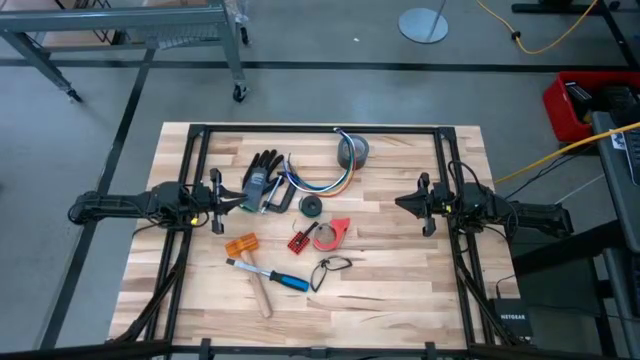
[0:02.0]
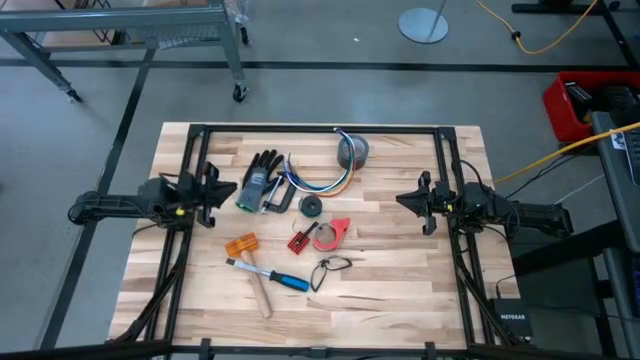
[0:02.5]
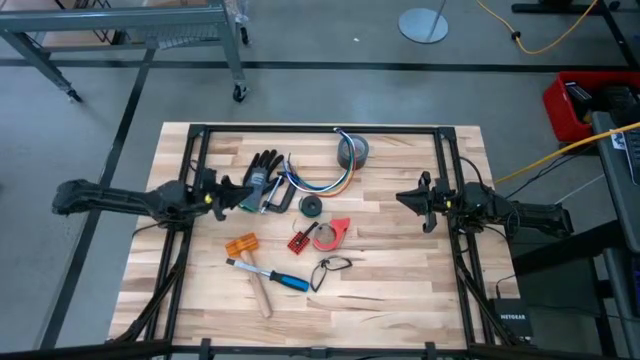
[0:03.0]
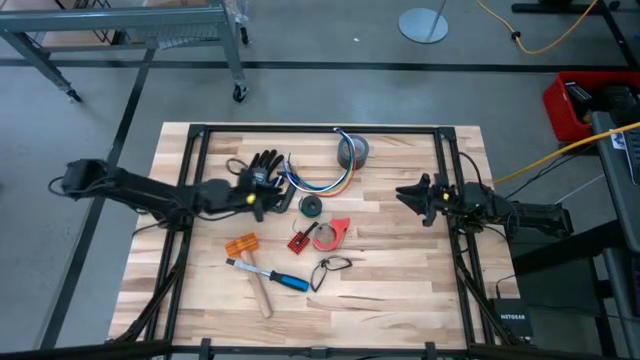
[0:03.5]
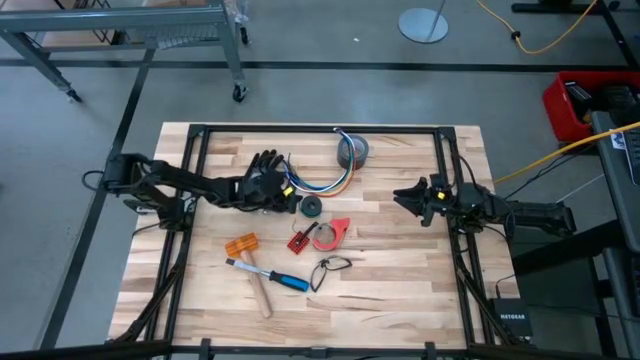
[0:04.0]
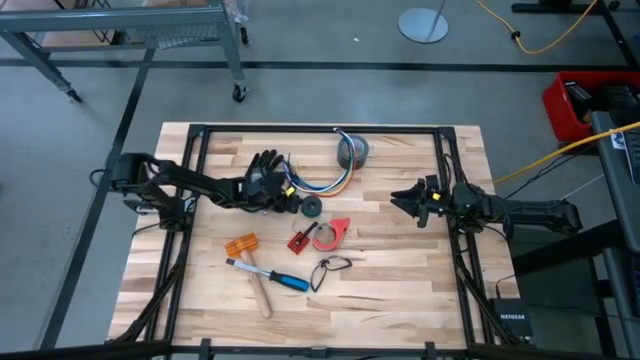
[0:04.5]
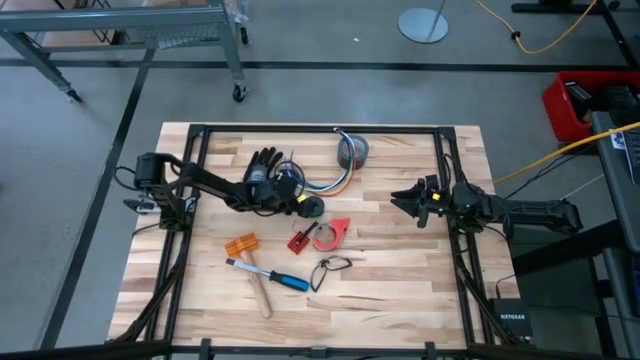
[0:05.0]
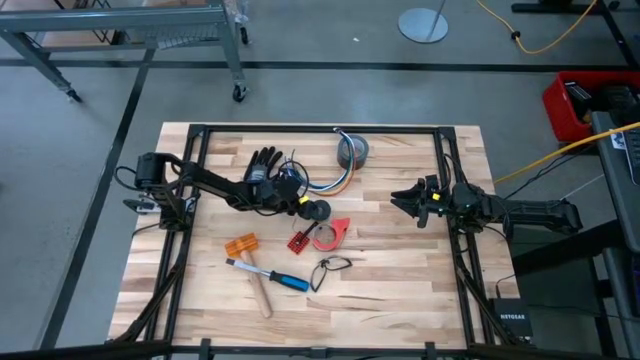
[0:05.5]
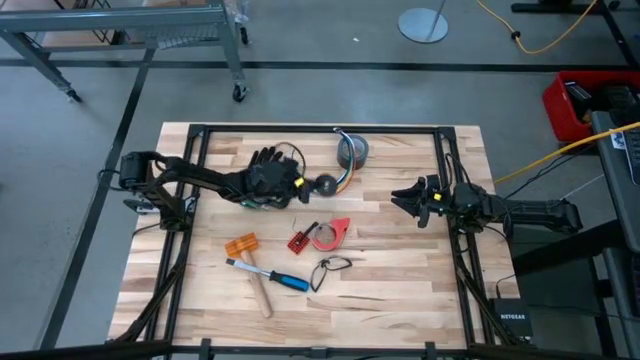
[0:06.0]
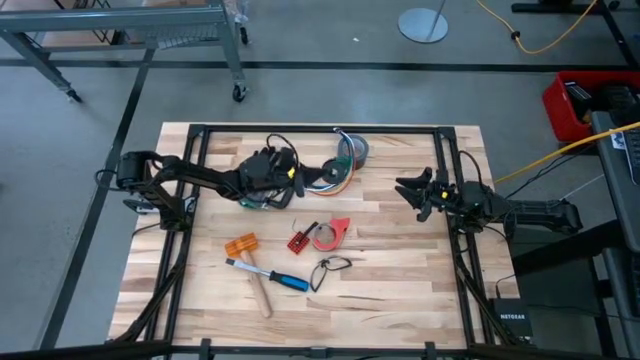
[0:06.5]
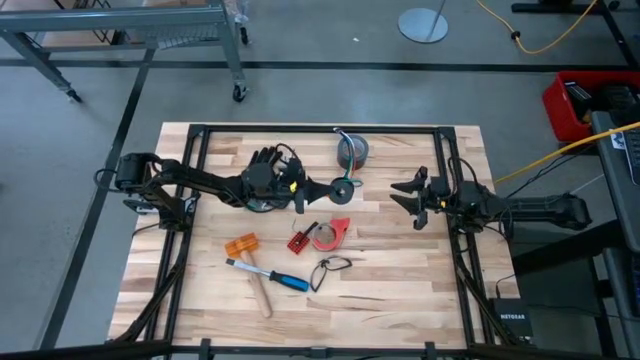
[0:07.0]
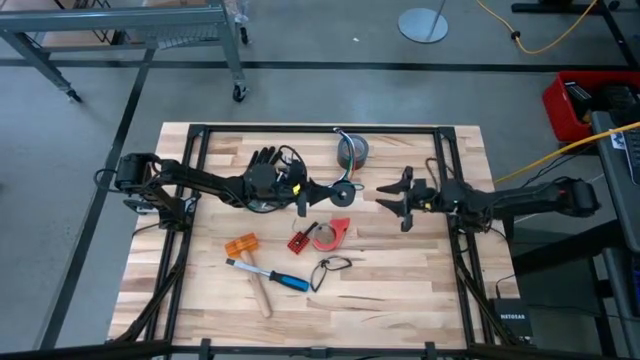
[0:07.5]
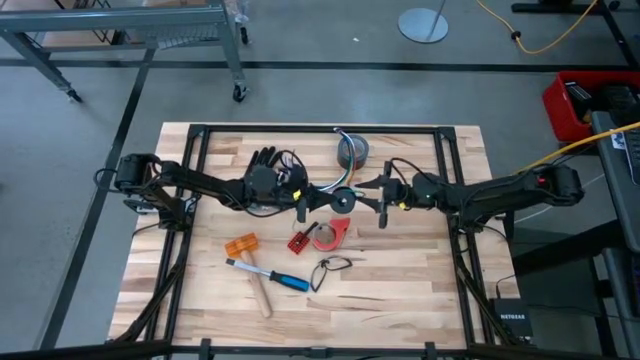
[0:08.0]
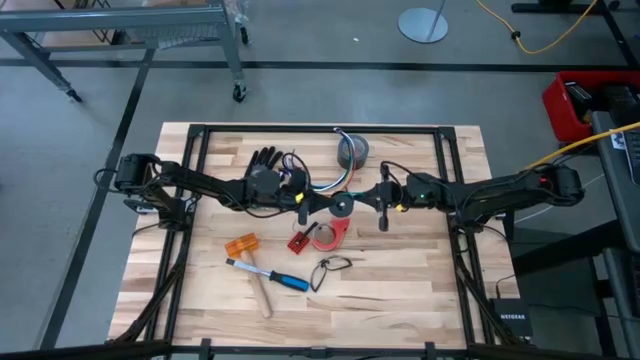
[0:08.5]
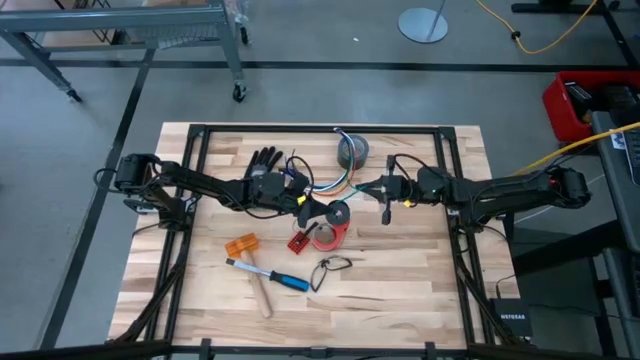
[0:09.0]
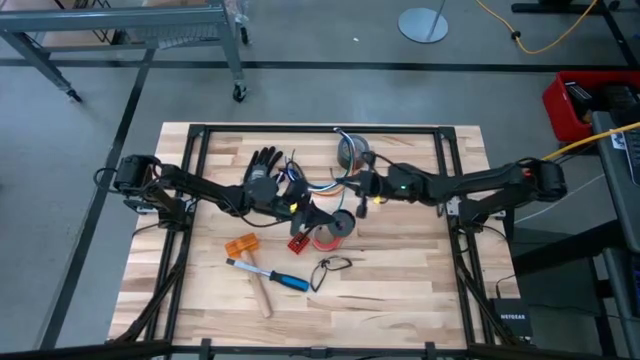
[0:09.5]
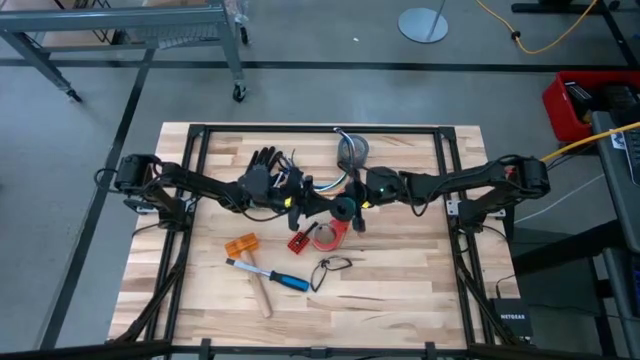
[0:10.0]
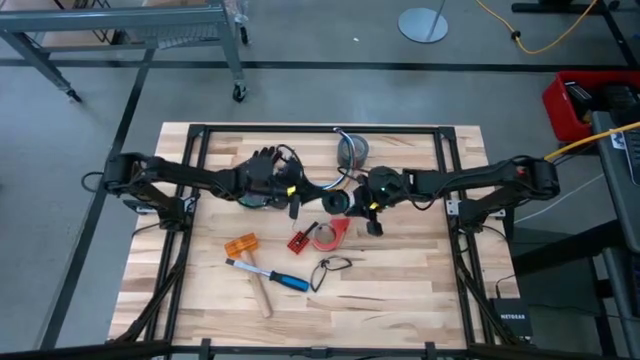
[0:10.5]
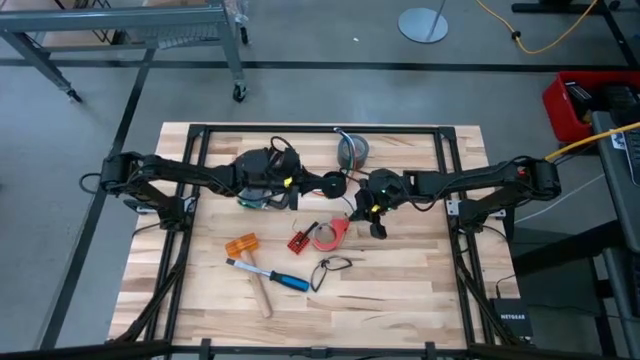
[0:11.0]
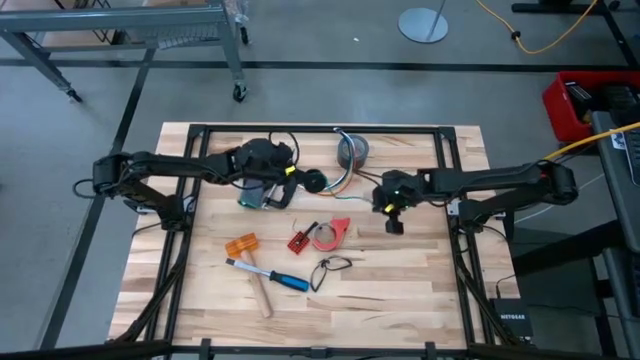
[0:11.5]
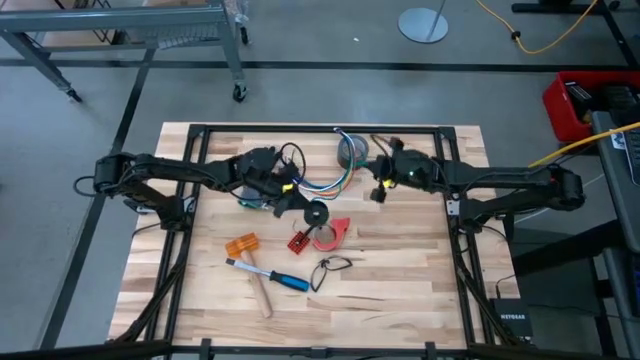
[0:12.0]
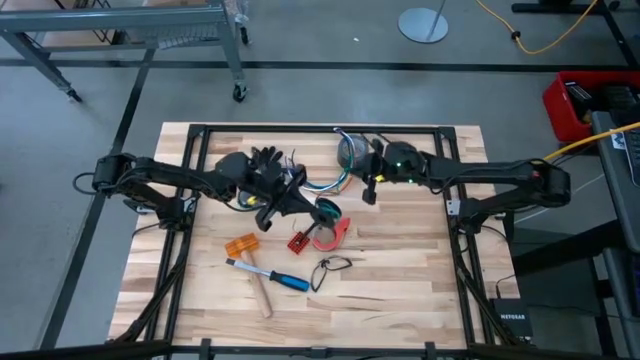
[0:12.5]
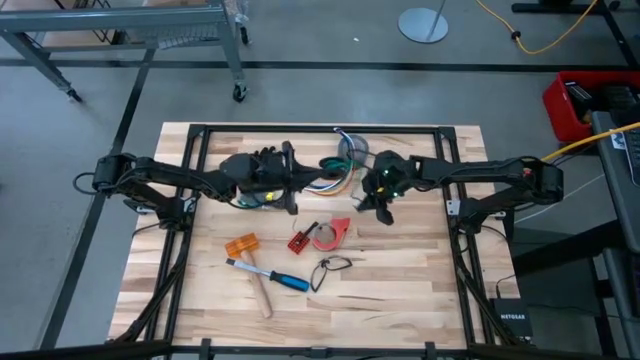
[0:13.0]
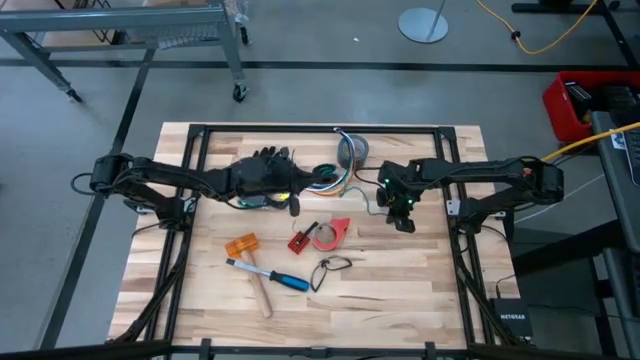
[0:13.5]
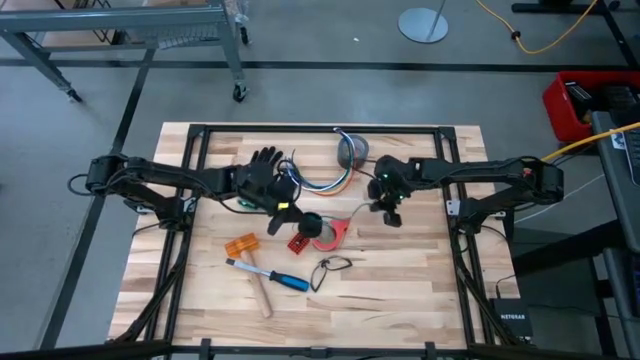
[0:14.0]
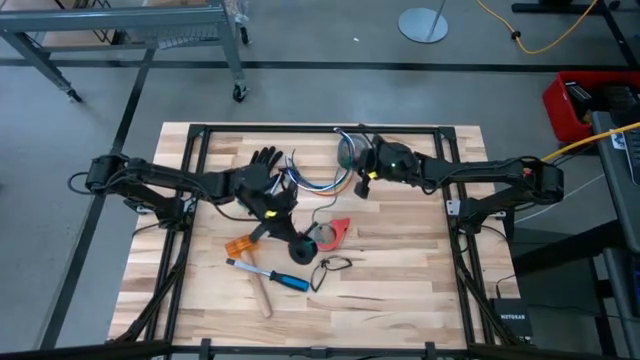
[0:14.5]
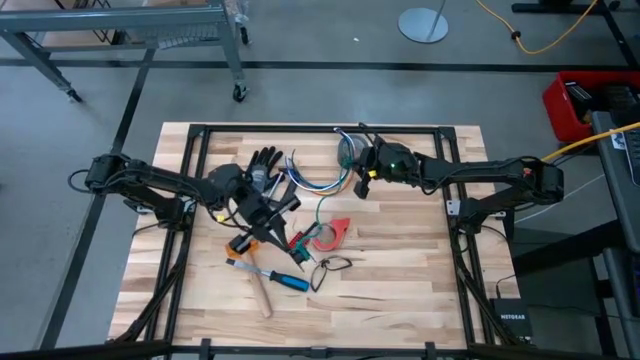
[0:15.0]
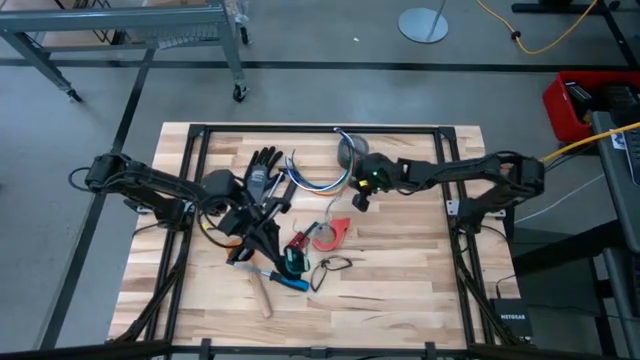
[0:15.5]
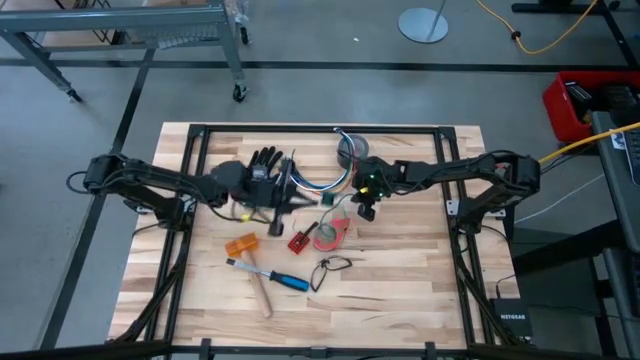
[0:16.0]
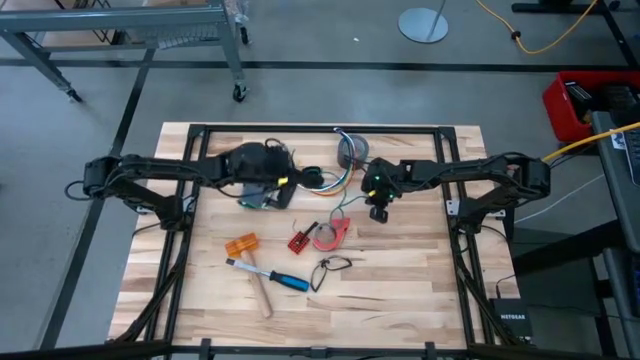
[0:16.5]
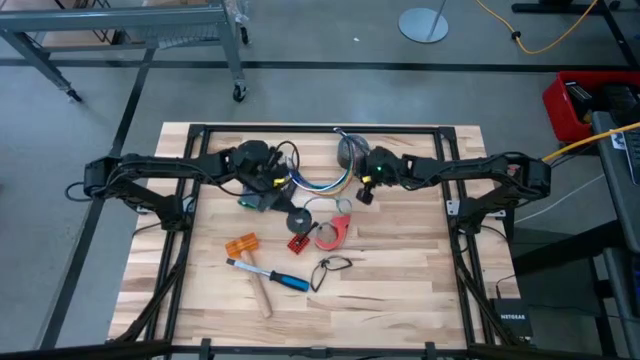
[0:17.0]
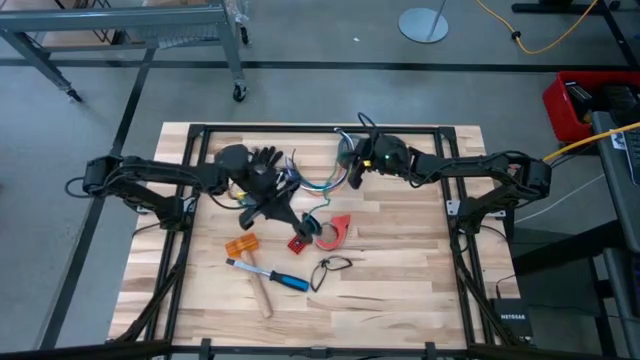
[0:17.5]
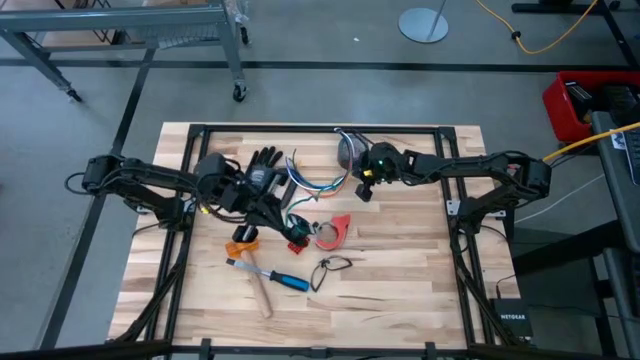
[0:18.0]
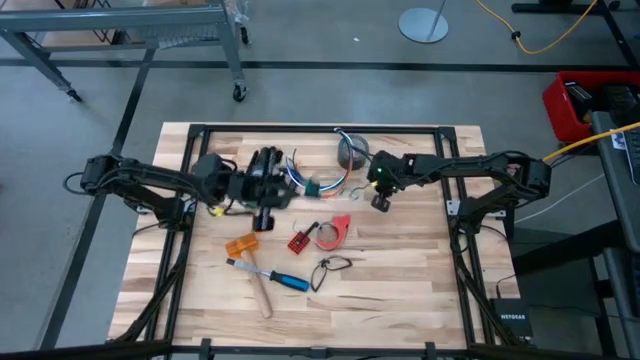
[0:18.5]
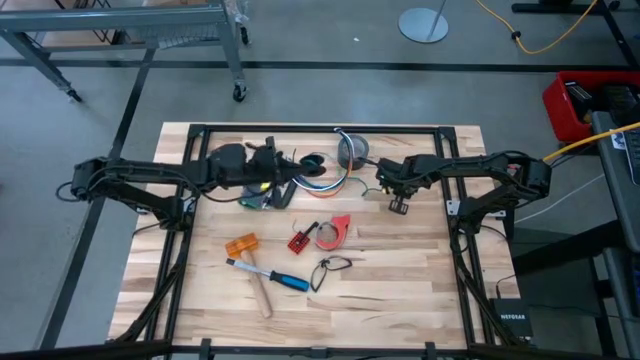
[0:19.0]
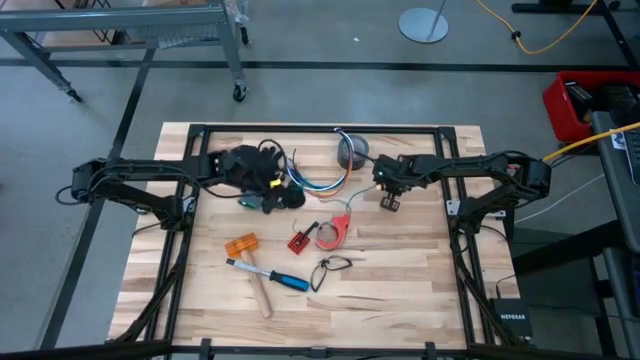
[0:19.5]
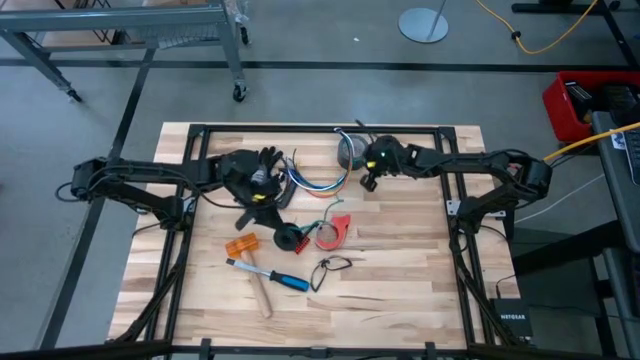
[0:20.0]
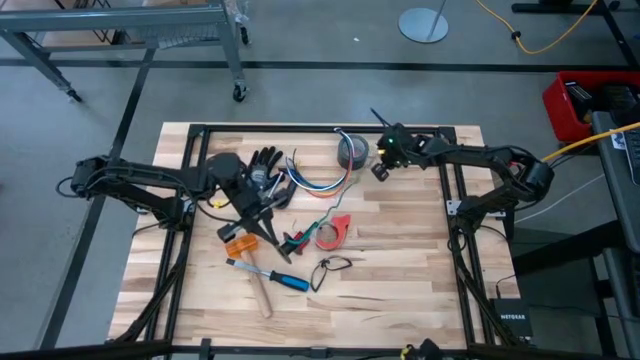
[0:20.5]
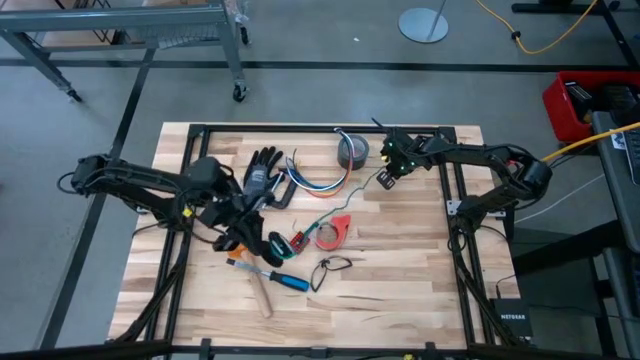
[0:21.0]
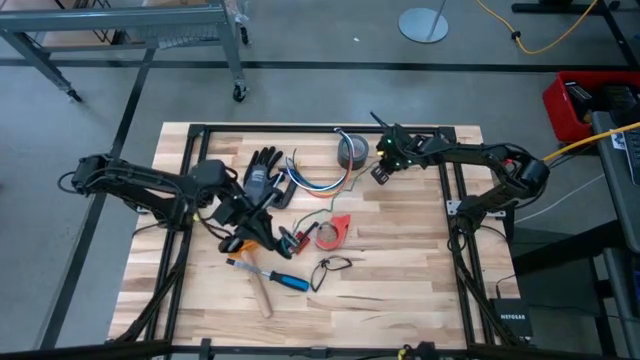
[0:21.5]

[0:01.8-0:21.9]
Task: Coil cords
Uncoil the green wire from the spool
